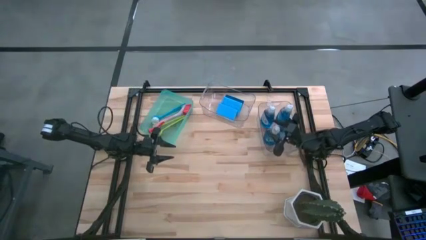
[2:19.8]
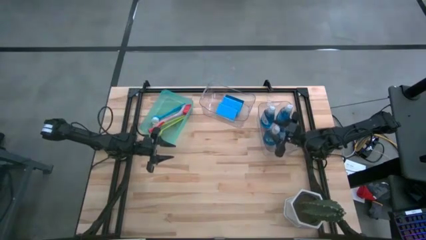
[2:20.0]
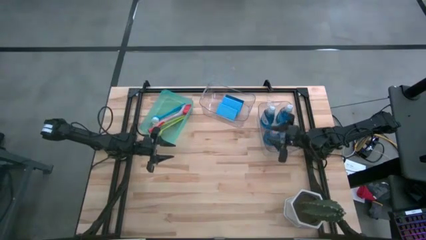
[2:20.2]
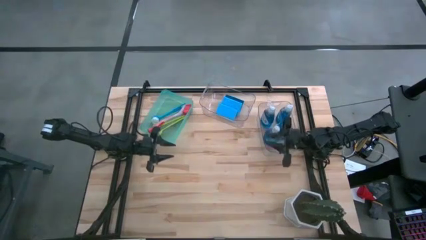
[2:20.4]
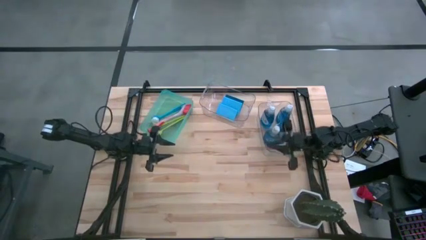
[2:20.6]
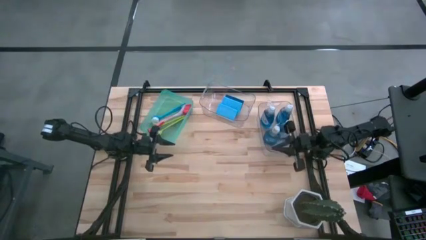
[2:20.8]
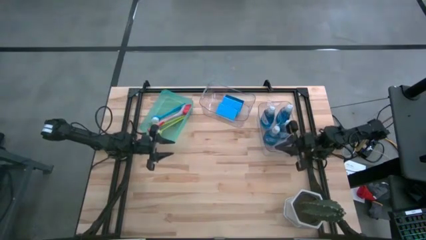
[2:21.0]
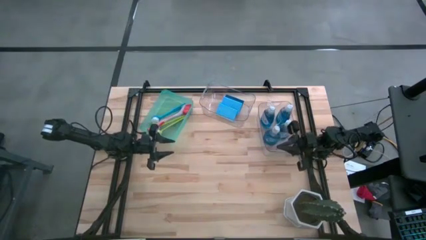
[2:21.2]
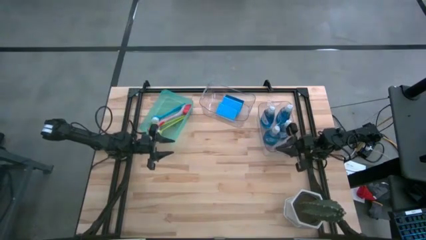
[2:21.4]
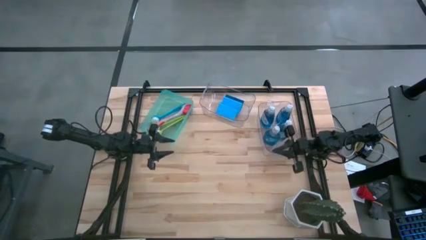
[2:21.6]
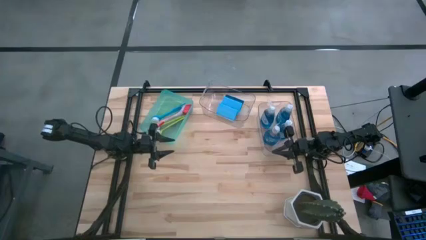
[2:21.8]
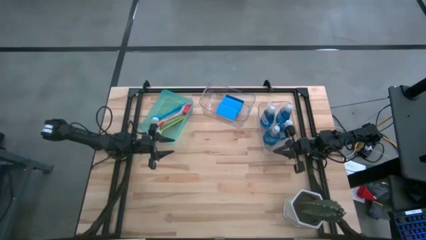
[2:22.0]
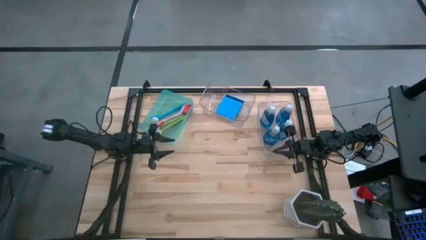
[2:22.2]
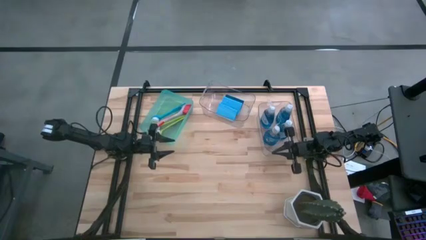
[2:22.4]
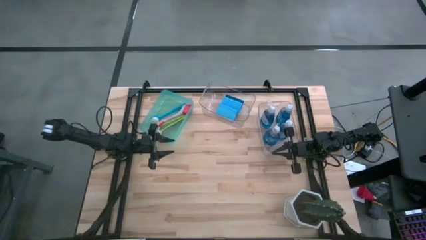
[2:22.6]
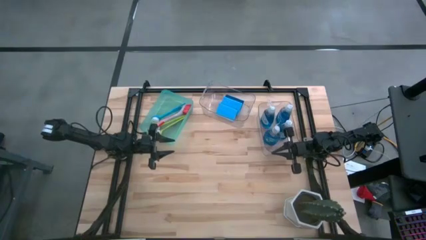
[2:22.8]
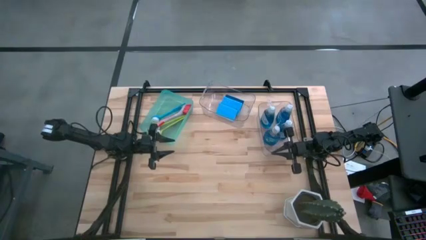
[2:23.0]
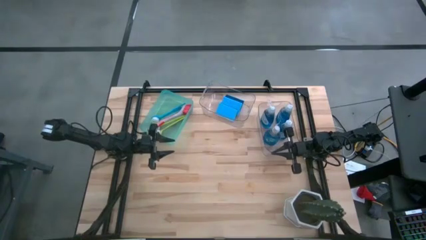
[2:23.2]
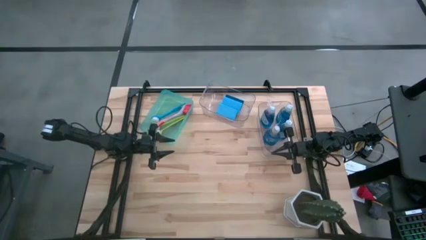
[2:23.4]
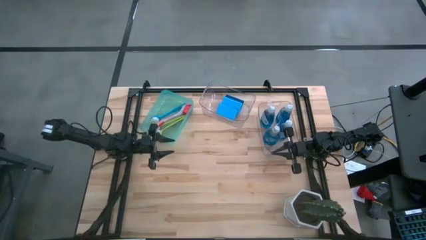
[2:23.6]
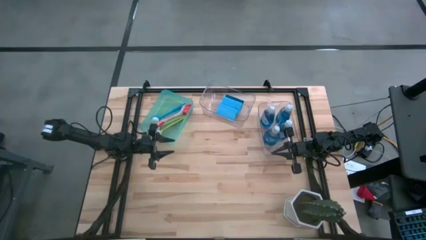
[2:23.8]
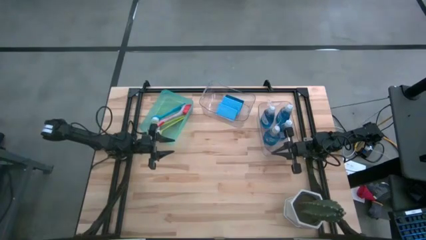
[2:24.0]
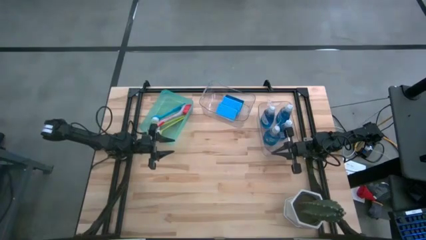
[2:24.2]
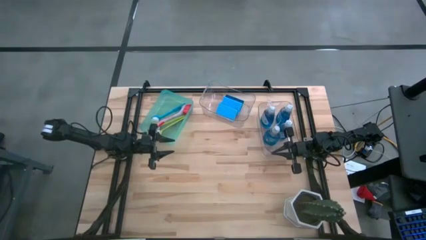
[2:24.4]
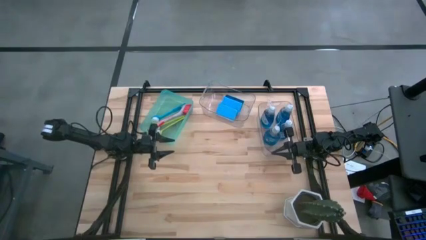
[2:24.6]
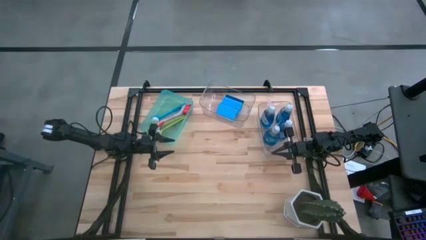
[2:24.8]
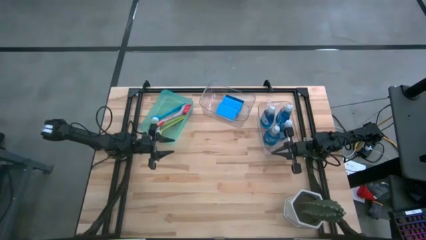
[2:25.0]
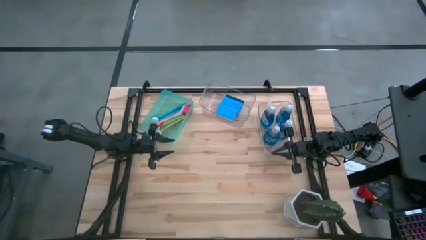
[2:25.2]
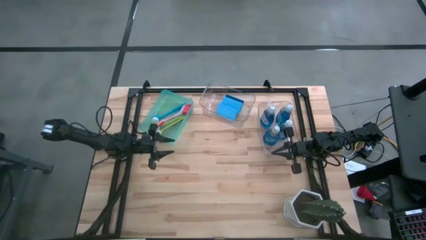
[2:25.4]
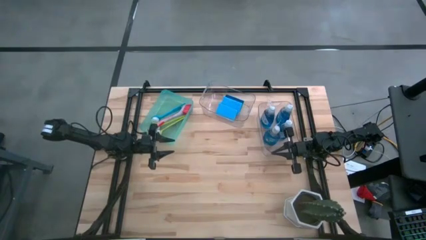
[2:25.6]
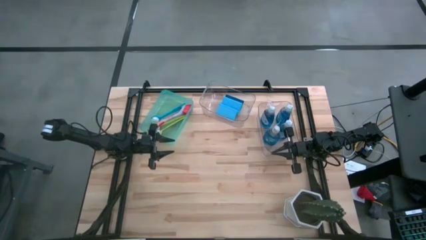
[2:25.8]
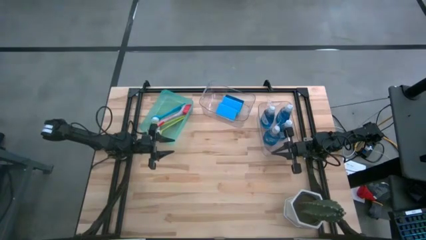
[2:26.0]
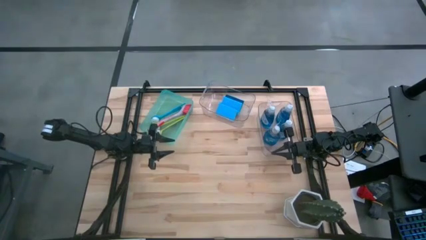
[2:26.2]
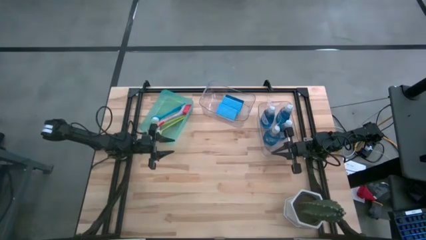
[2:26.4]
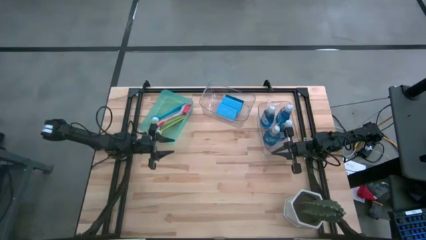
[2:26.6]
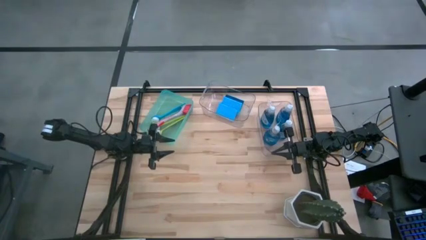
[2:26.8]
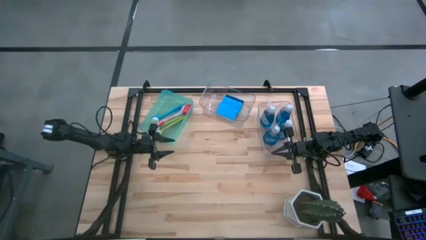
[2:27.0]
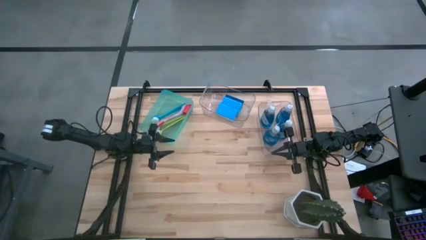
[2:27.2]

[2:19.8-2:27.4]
Task: Pick & Place Kitchen Sink Supplies
Return to Home Position

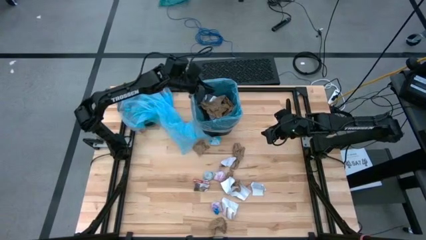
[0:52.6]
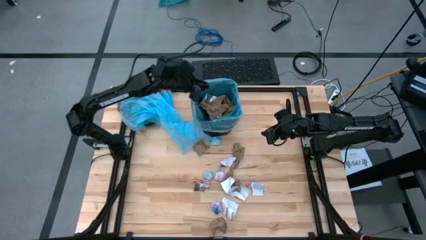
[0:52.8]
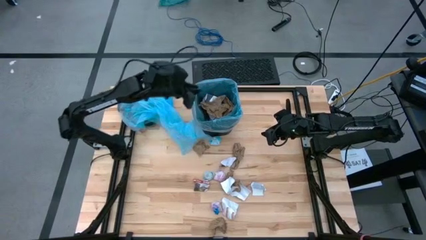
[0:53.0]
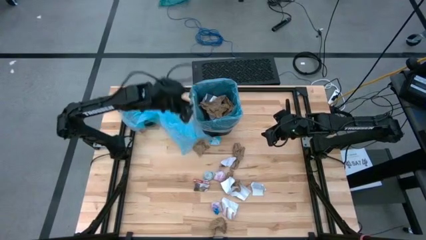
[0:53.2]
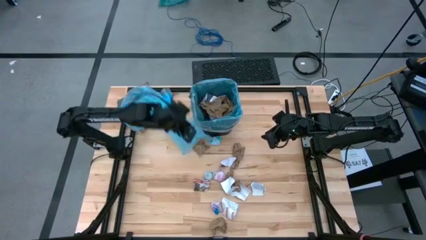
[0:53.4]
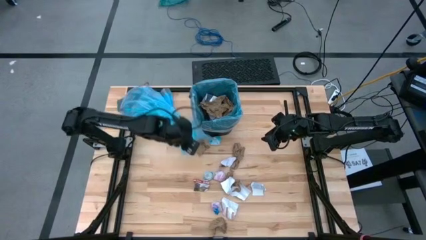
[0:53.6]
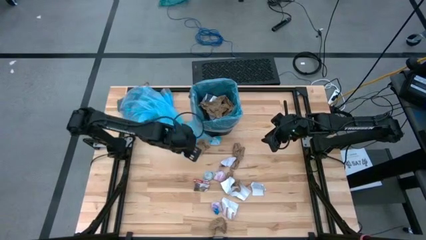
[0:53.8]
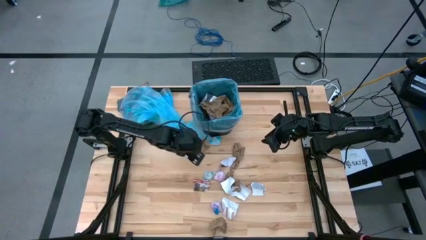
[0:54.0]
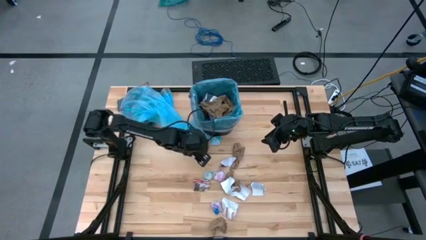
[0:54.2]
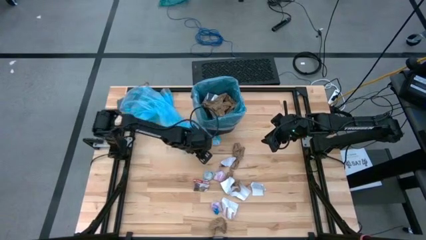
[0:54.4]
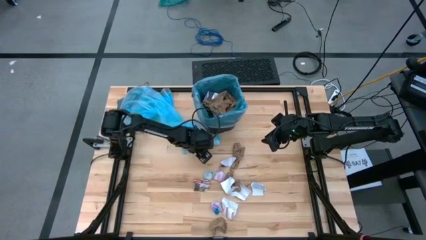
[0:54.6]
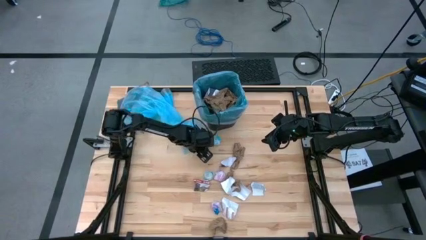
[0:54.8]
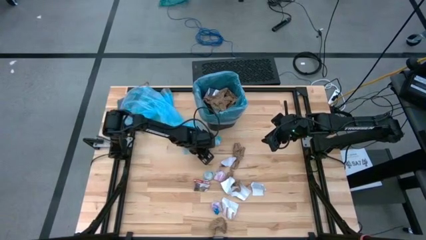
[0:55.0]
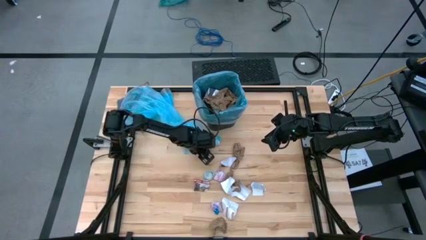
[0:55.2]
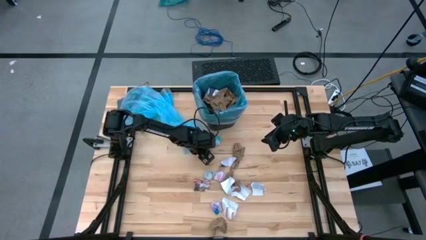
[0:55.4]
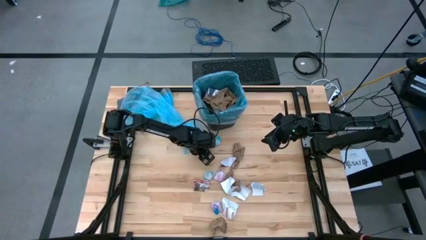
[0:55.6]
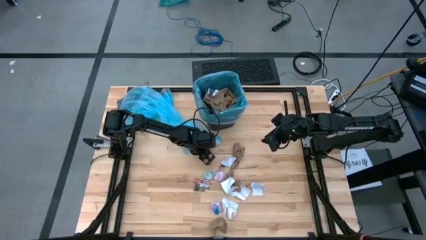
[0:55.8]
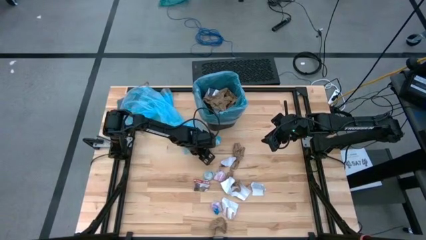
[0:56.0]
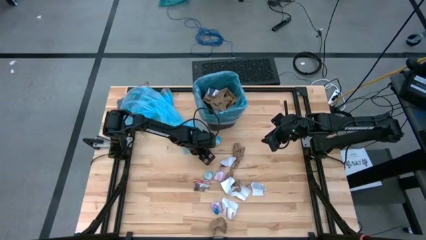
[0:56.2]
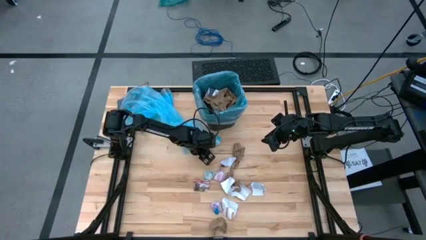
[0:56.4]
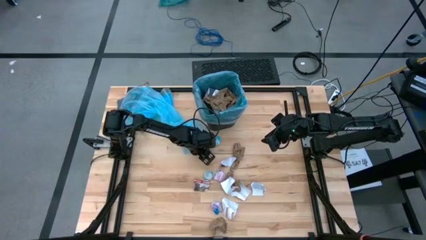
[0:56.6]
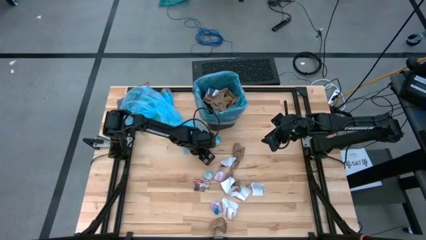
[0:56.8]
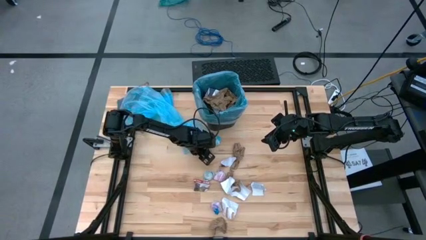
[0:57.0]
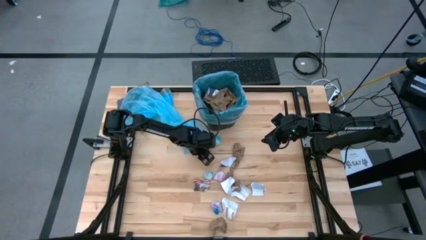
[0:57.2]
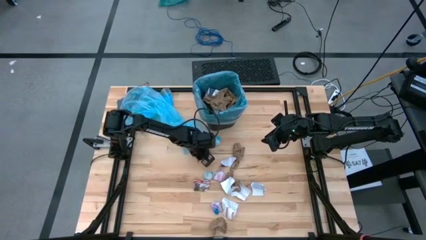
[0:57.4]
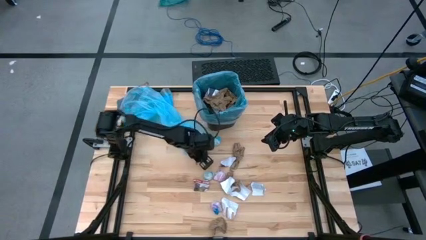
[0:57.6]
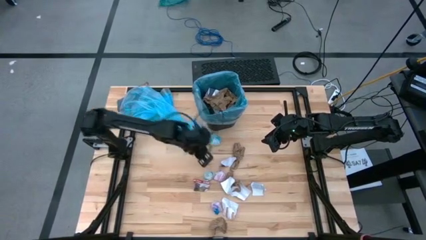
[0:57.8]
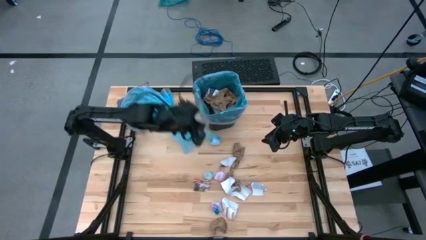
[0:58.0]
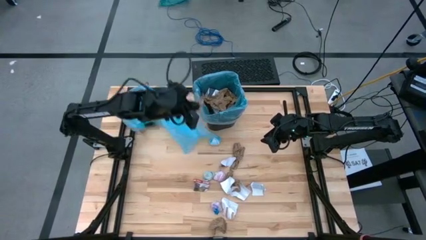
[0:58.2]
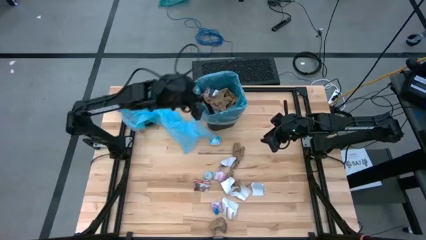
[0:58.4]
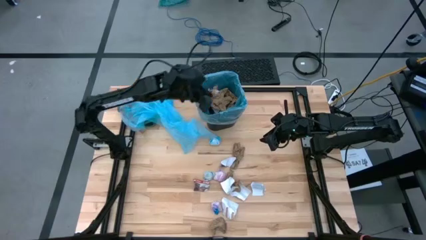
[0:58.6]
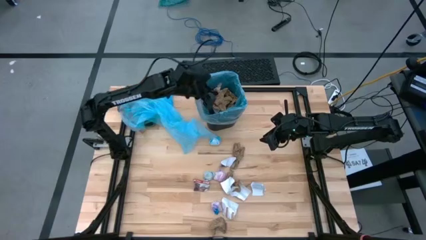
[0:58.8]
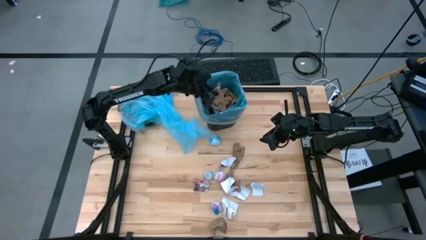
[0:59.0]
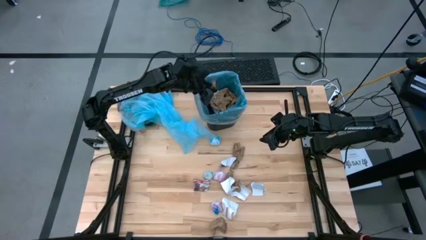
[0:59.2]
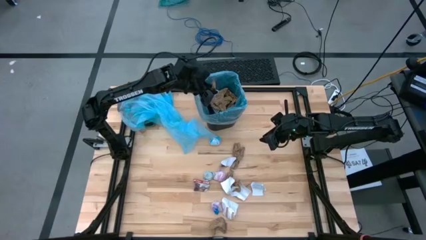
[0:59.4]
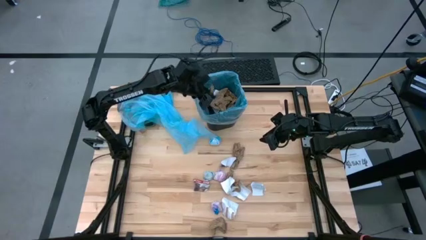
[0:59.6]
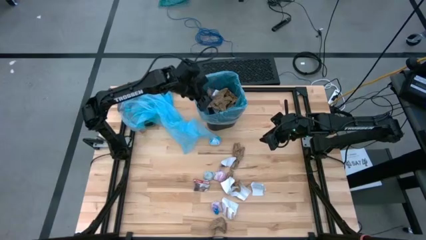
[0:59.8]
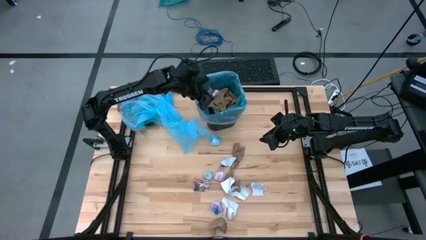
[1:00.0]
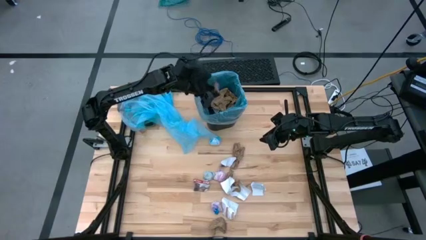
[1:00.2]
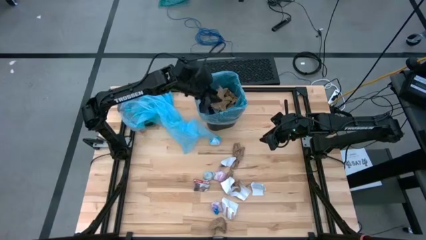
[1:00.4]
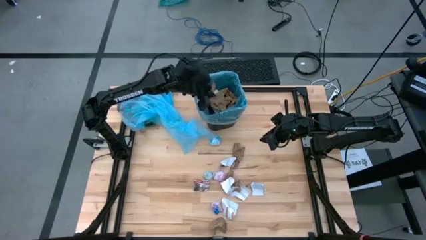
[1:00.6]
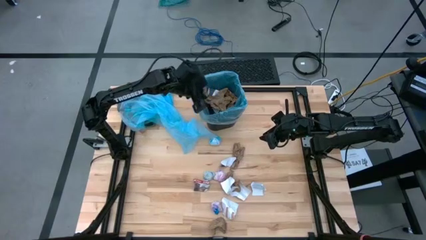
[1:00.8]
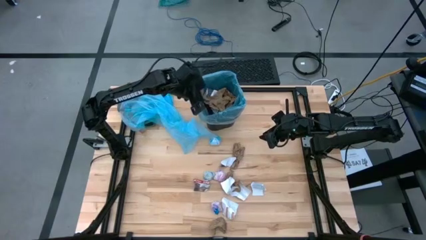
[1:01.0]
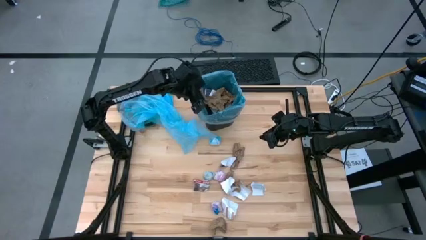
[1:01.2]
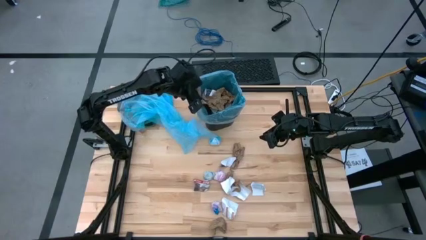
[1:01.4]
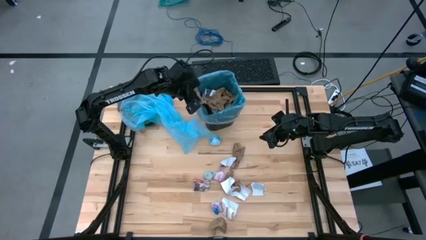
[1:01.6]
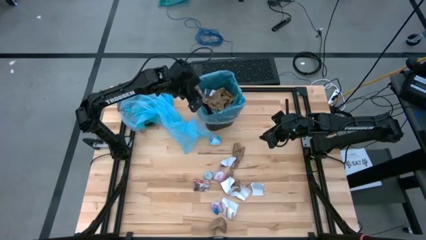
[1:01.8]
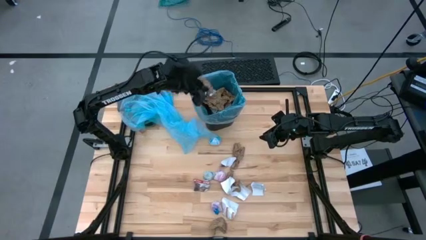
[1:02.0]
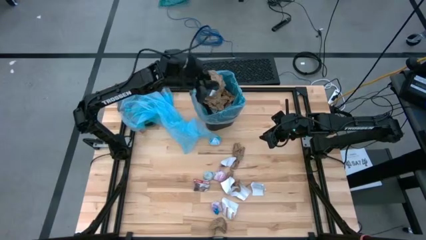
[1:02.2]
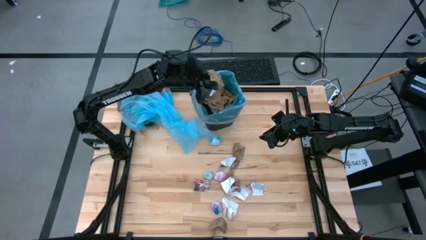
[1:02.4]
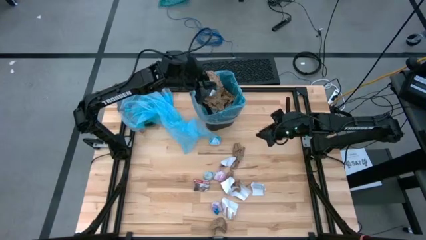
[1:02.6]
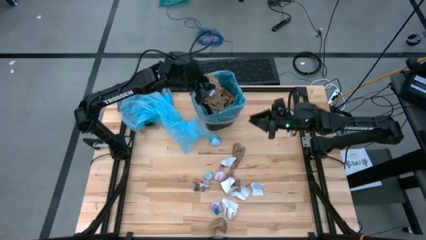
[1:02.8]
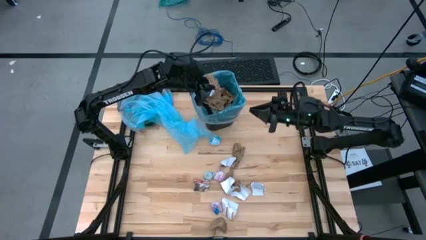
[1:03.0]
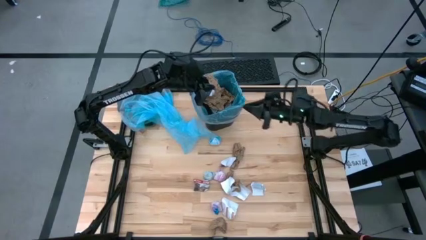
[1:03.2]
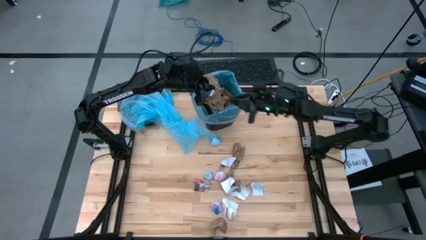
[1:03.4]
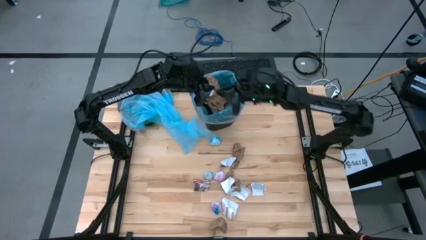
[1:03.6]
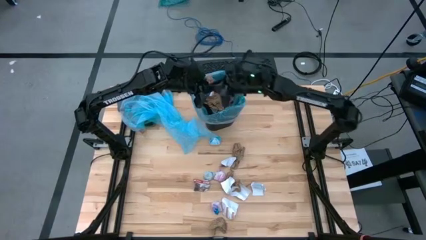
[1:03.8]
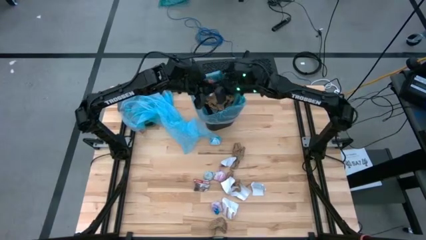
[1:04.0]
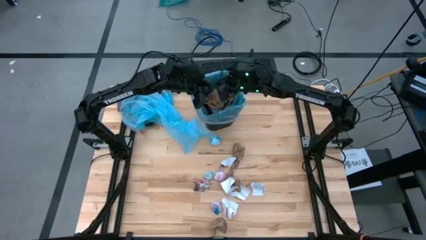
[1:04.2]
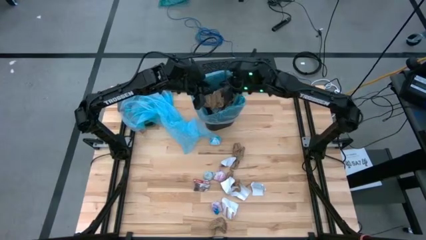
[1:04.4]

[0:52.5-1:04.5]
Task: place trash/remove bag and relplace
Put the brown paper into the trash bin
